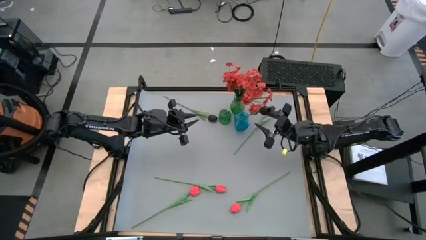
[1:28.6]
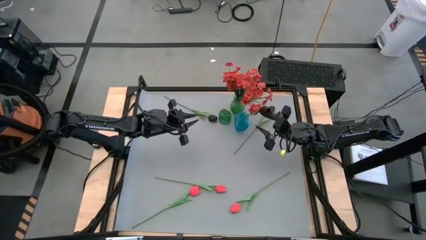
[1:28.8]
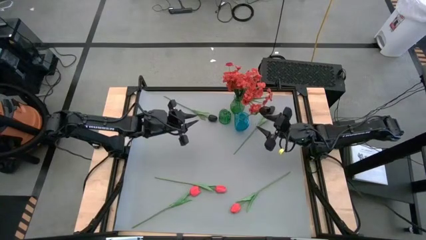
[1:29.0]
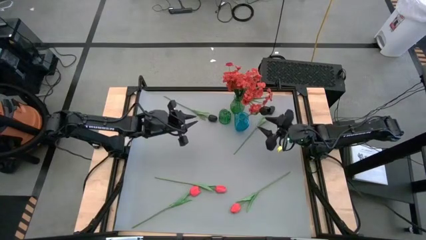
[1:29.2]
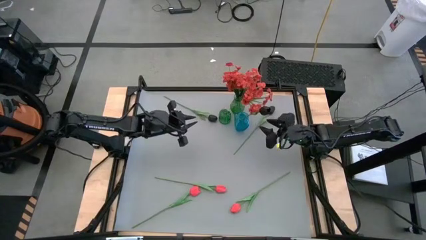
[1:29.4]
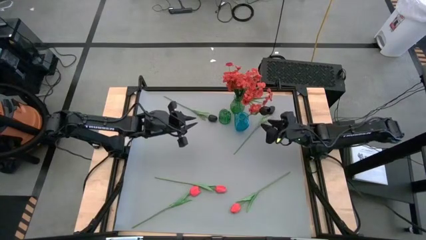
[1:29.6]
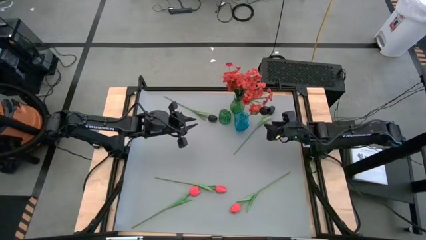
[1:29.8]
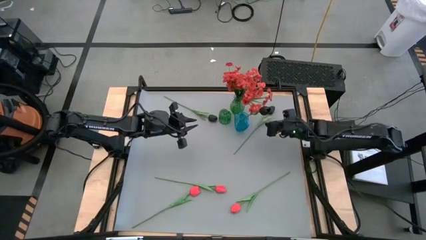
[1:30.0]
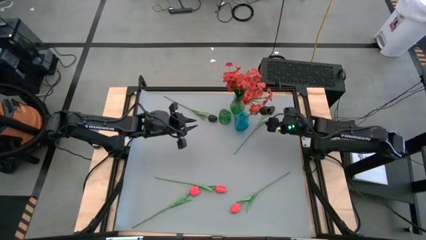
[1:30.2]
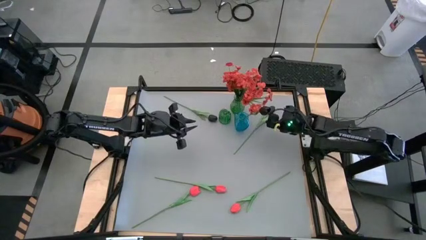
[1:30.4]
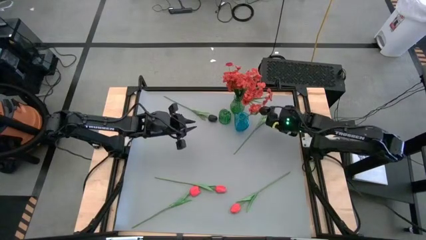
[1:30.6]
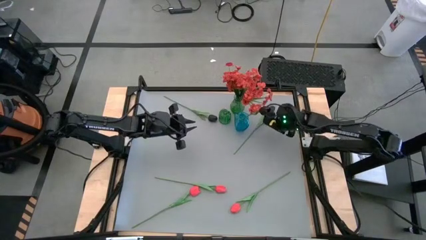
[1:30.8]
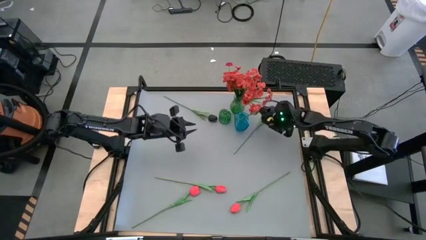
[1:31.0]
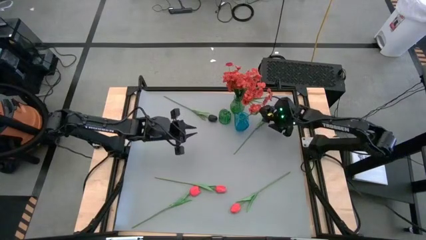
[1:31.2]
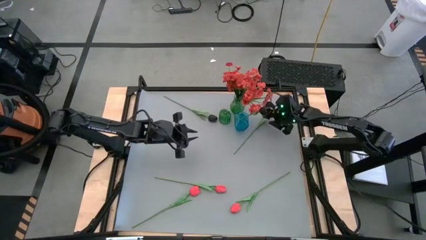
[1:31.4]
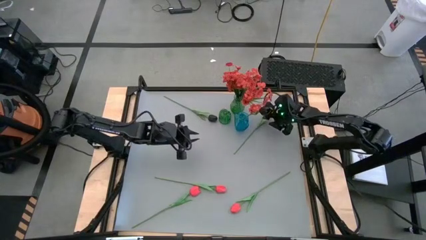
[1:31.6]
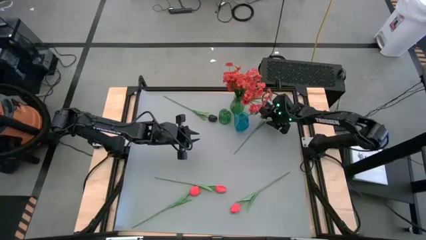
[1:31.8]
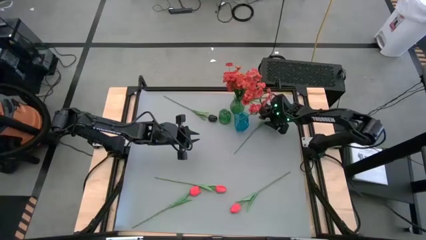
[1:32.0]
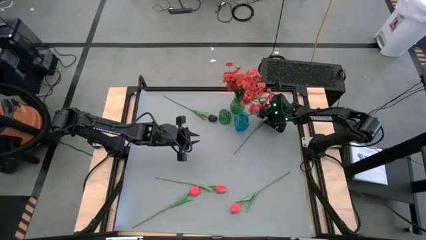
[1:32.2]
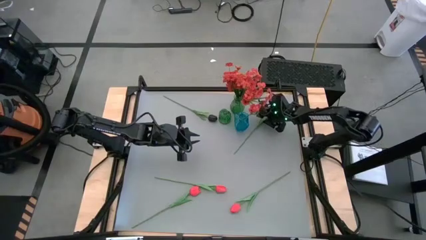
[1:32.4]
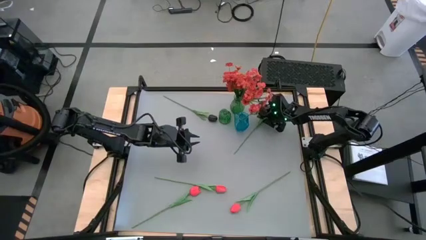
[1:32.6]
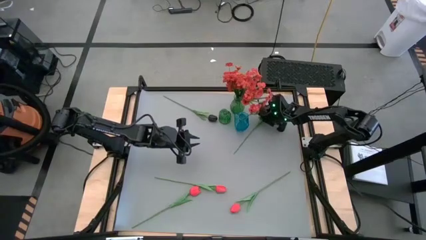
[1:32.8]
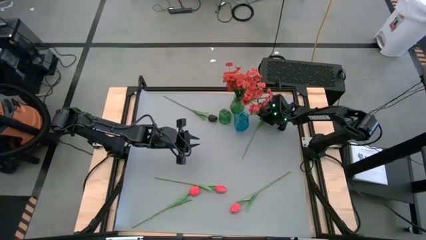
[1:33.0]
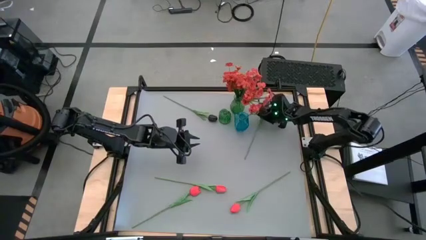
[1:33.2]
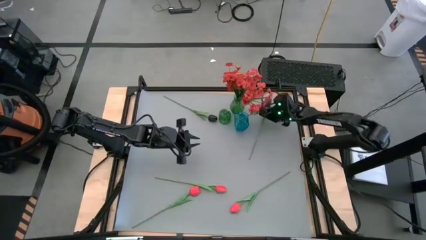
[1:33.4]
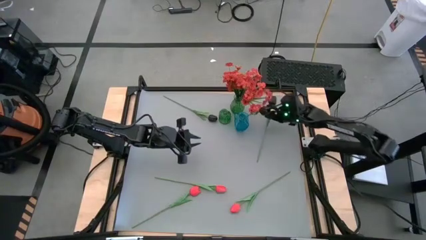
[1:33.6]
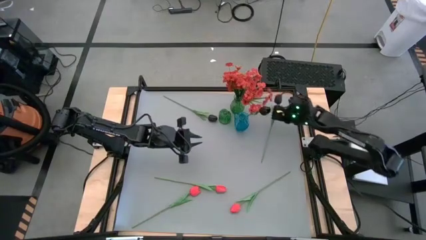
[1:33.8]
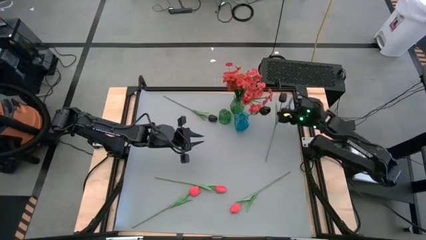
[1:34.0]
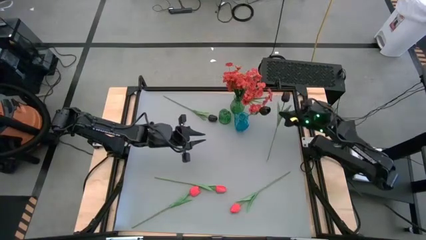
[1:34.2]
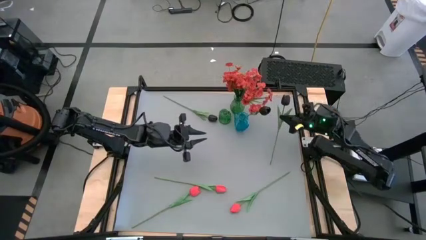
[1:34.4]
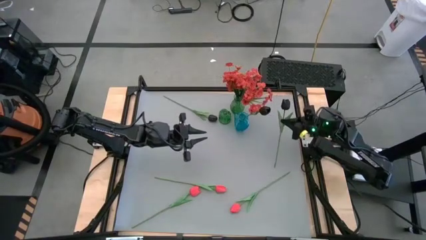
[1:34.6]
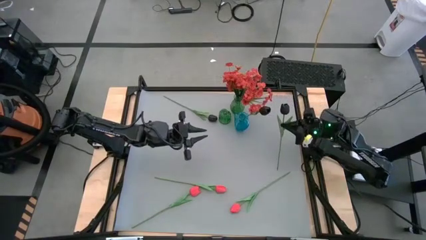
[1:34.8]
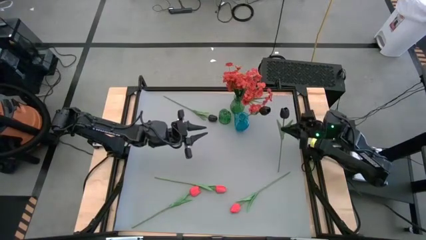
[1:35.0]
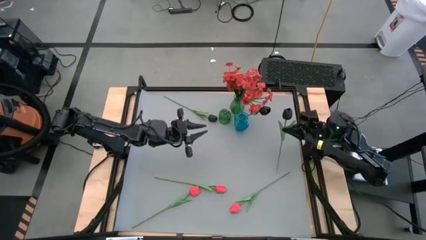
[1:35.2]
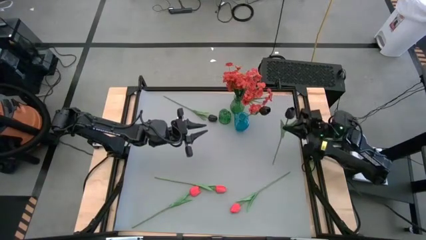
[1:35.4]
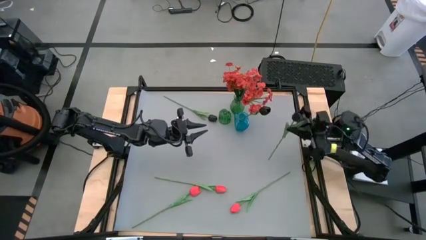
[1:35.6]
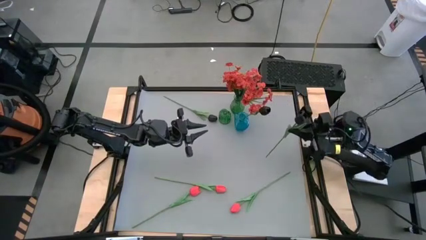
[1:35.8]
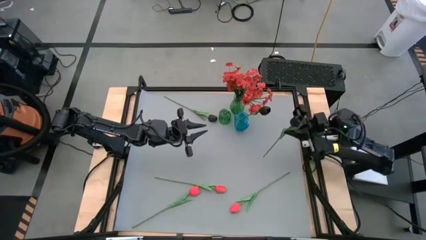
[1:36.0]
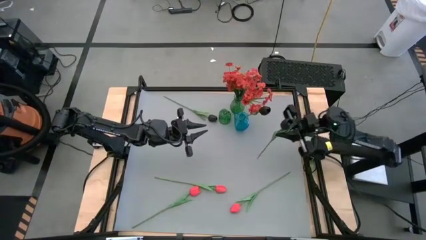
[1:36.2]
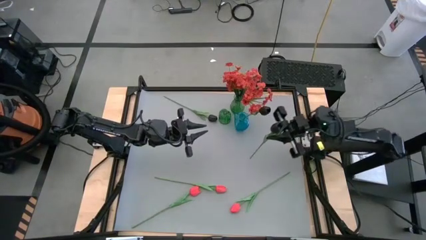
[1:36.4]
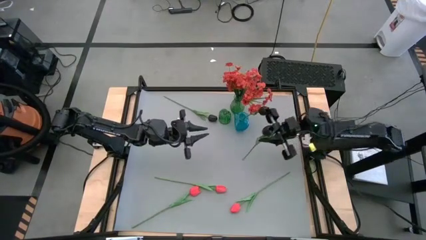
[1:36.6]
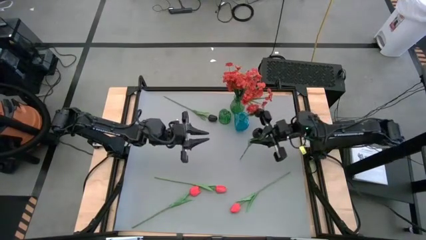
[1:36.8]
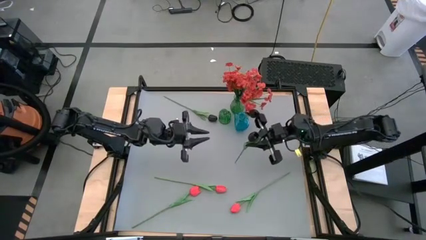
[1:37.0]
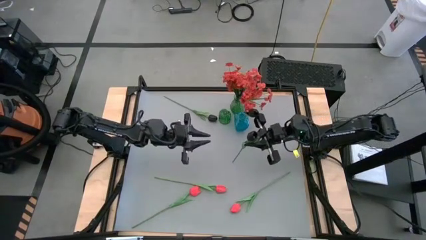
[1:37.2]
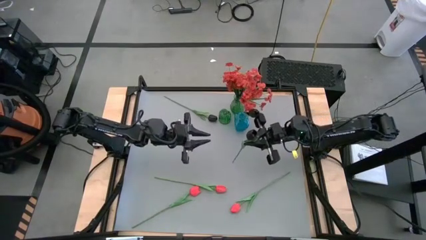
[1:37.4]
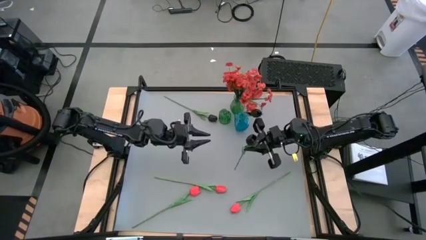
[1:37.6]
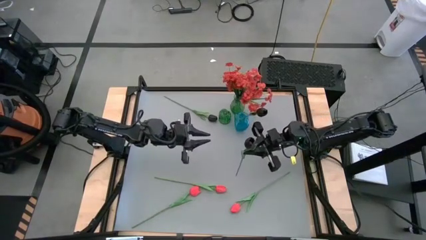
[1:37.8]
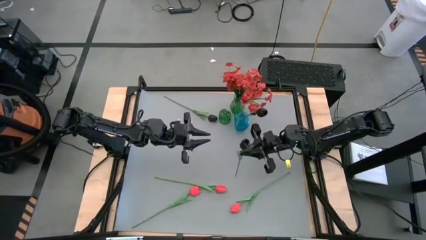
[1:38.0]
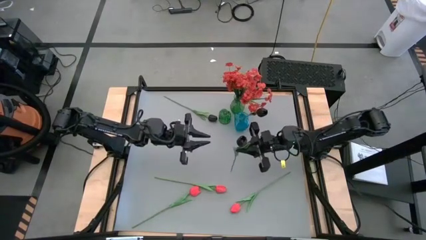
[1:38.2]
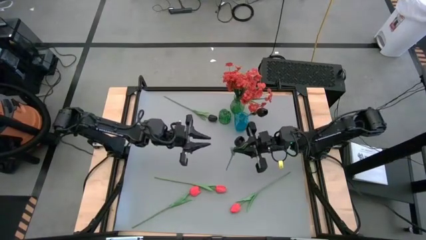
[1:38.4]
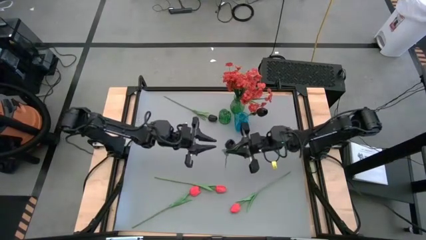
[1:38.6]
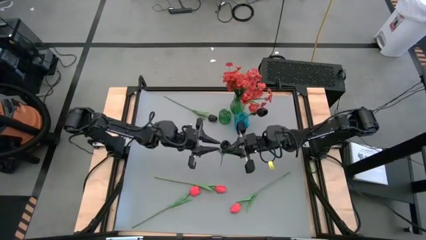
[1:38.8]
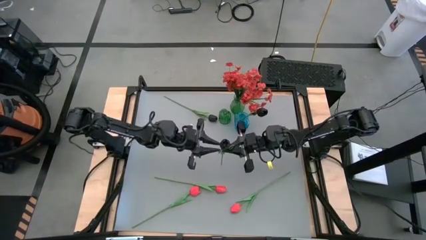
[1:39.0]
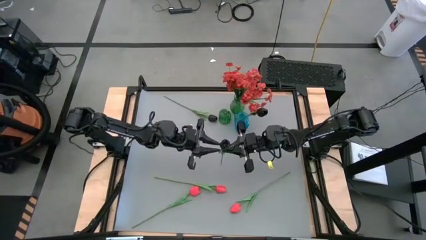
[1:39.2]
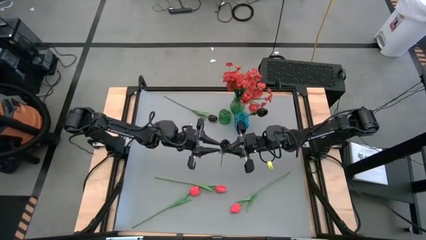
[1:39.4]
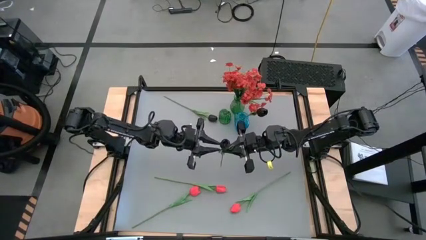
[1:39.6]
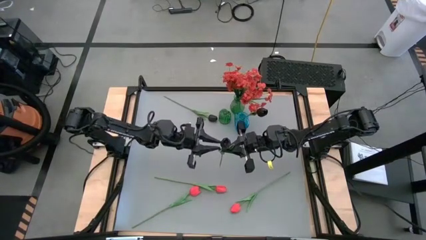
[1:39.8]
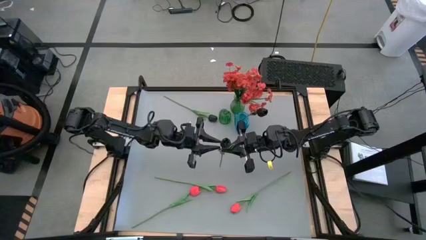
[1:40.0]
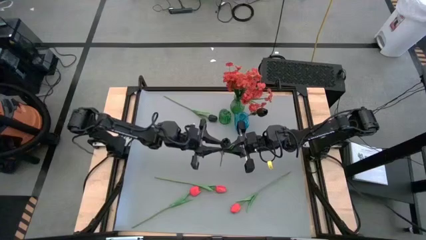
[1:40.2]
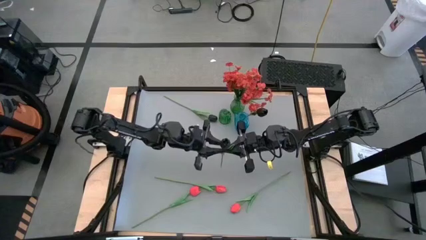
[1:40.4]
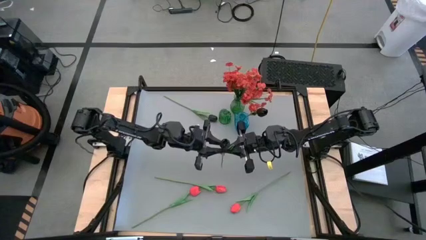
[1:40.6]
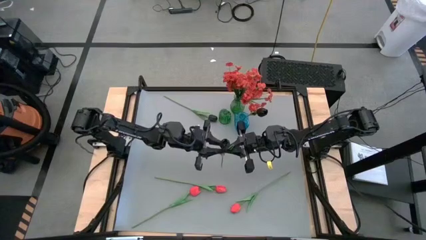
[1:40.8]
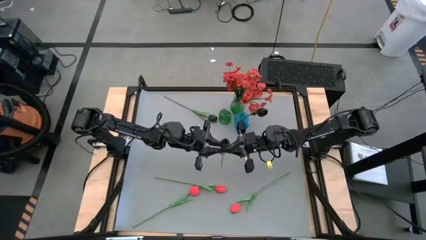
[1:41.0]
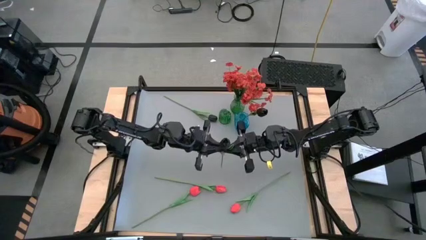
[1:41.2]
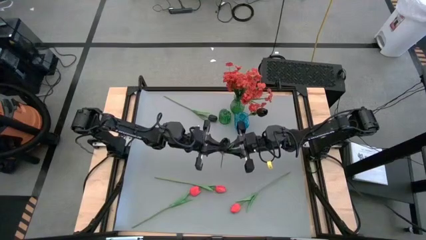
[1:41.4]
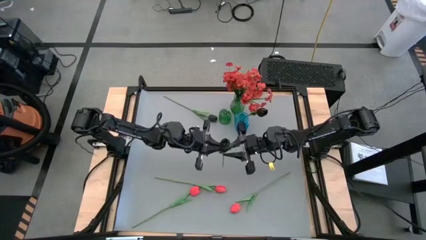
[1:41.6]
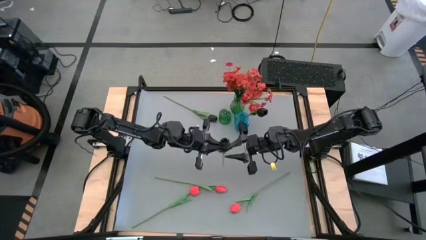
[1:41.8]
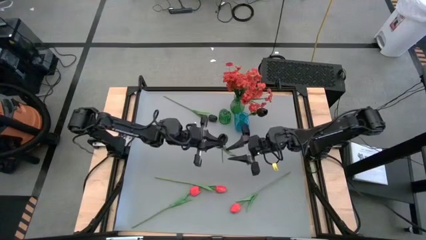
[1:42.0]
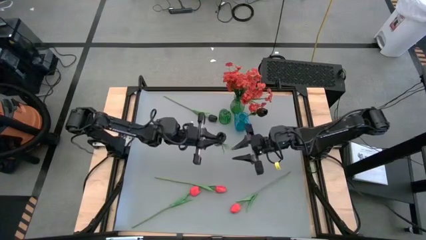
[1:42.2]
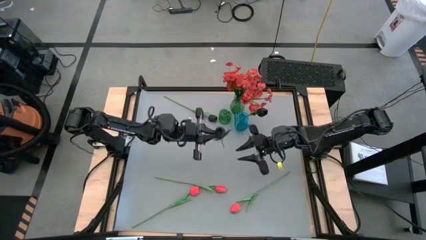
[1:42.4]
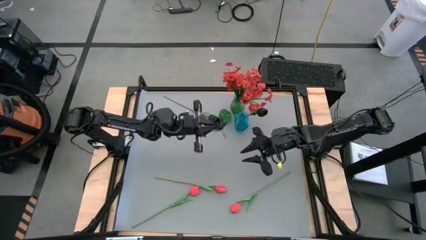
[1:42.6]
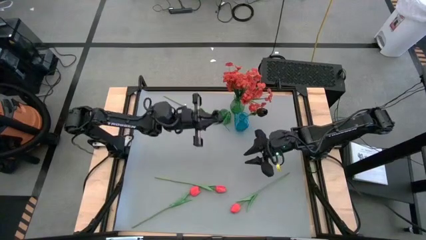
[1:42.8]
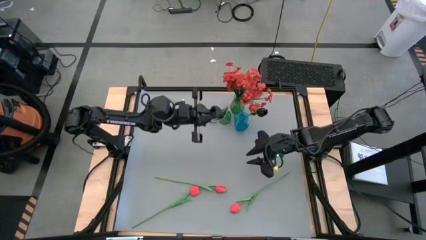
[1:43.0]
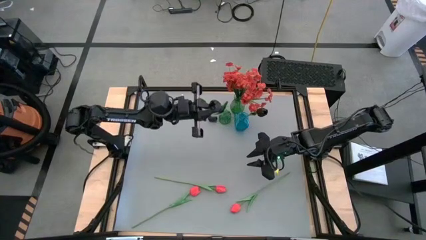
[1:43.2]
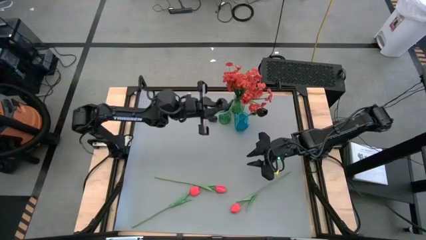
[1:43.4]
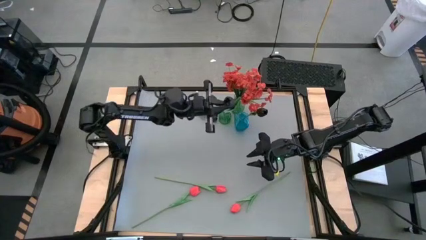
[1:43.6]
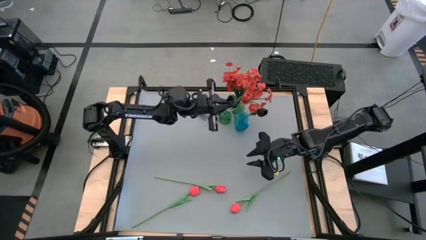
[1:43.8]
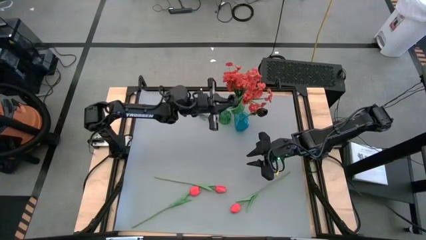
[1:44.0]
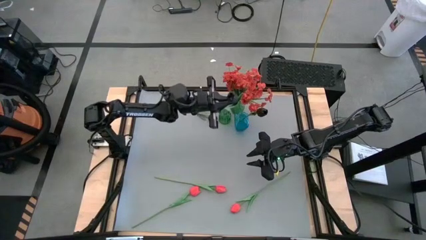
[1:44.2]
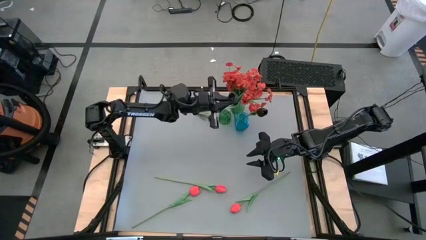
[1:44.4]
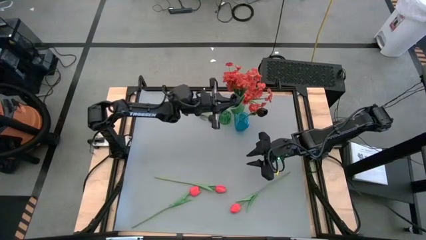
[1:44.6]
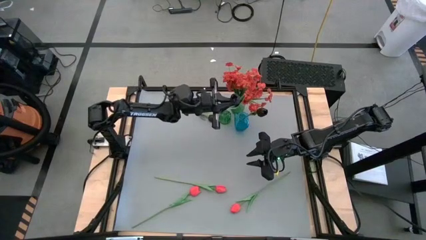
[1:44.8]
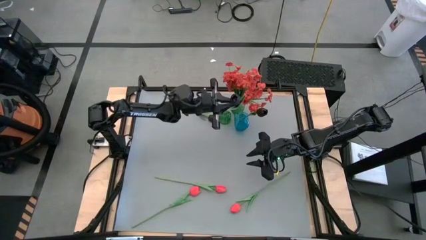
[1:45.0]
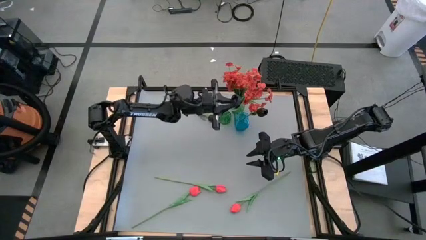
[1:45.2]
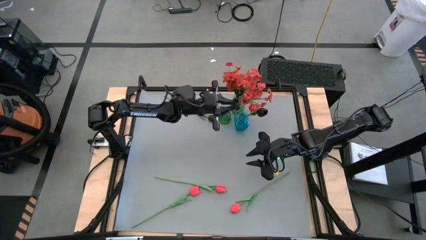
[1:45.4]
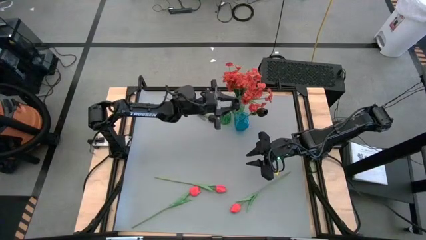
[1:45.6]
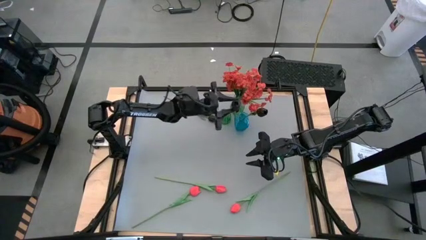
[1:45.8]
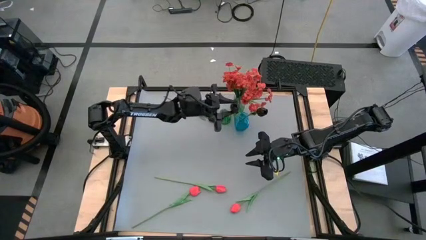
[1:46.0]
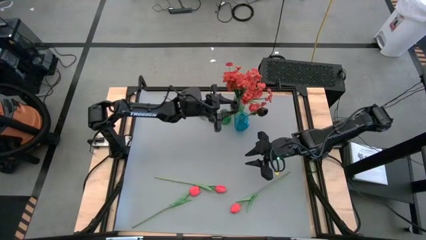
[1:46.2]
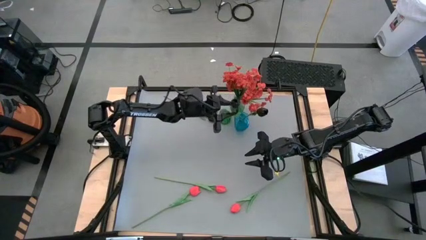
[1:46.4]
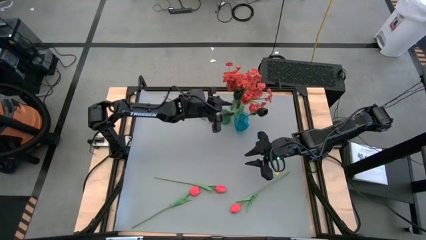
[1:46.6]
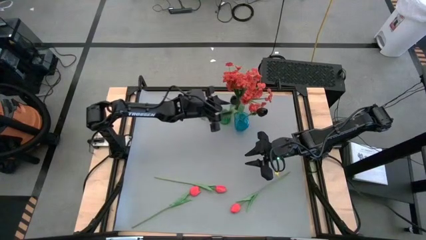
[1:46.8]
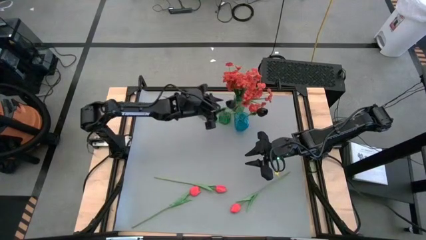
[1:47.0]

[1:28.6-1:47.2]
Task: Sort flowers into vase by color
Put the right black flower into the blue vase
